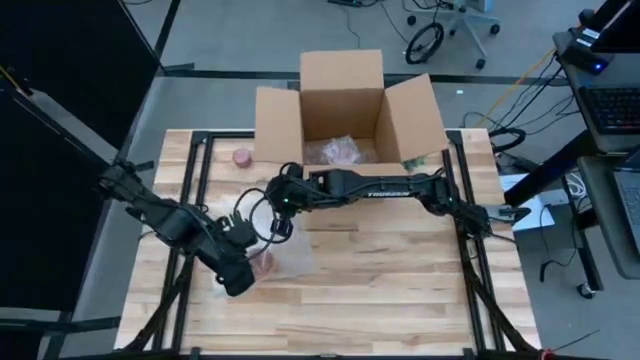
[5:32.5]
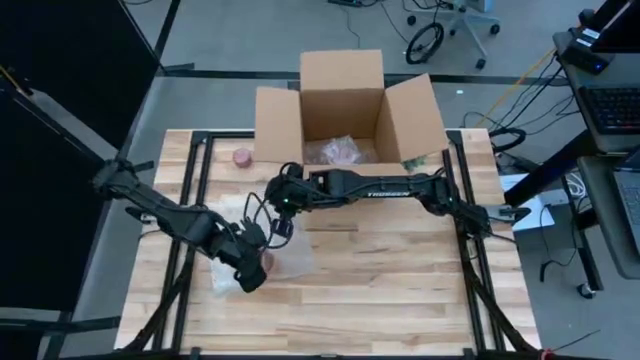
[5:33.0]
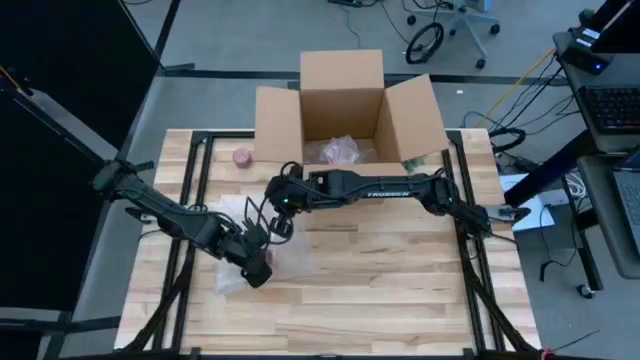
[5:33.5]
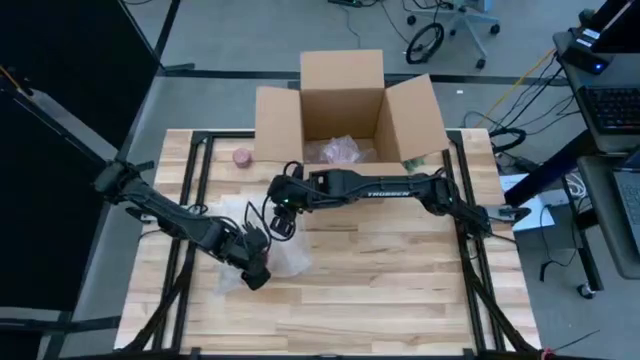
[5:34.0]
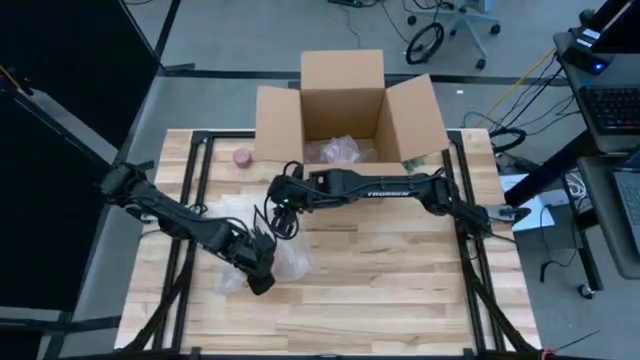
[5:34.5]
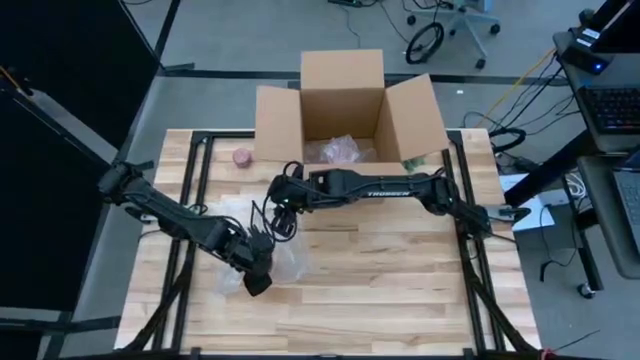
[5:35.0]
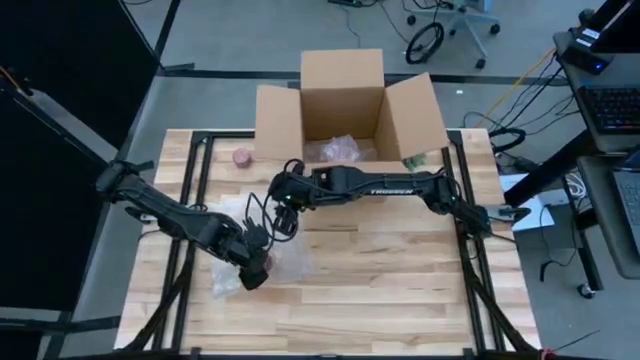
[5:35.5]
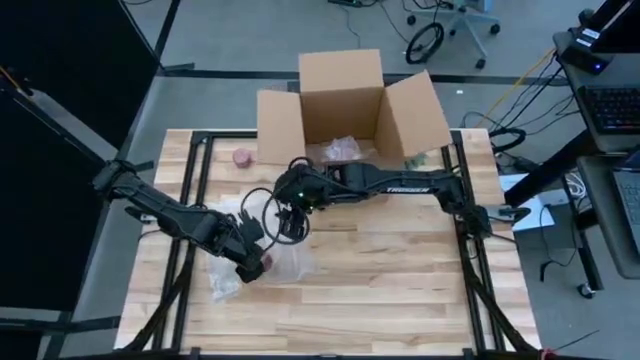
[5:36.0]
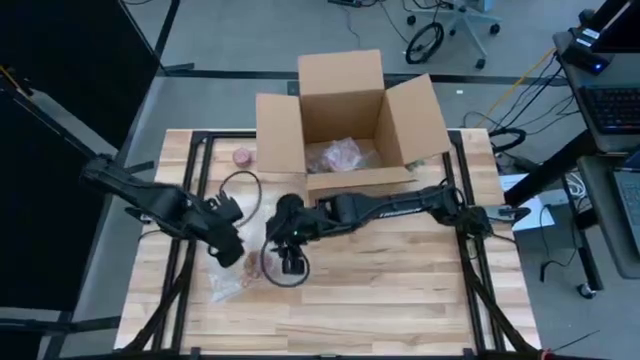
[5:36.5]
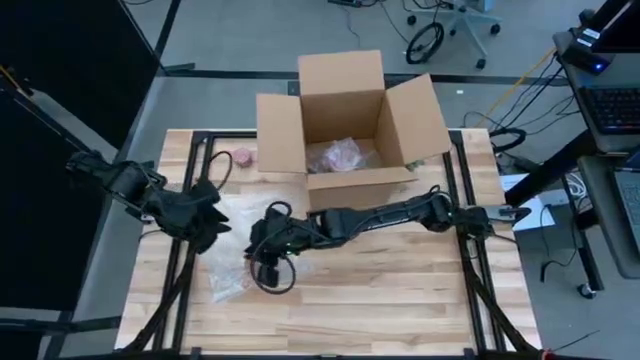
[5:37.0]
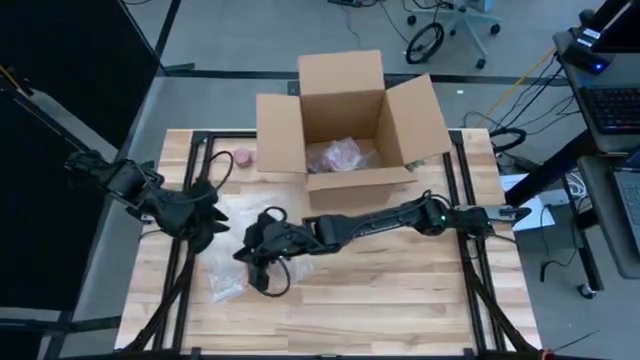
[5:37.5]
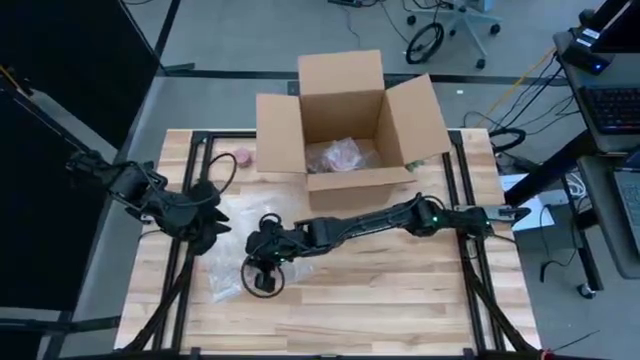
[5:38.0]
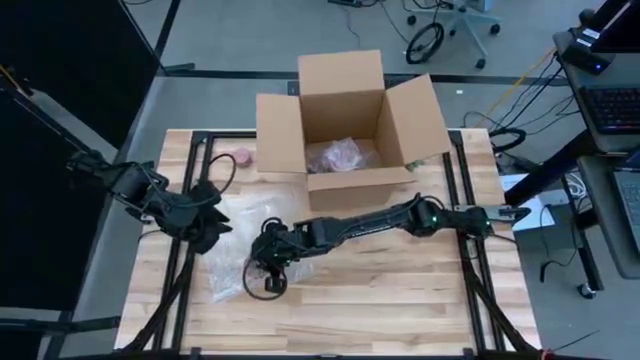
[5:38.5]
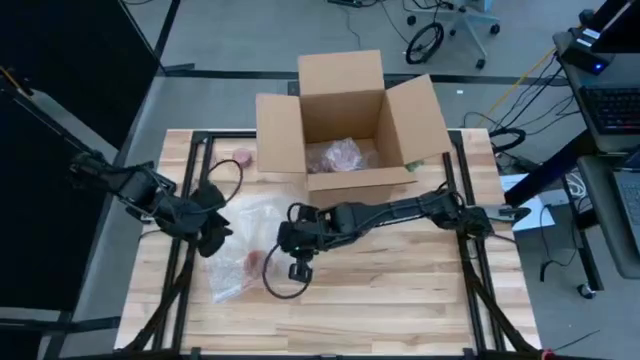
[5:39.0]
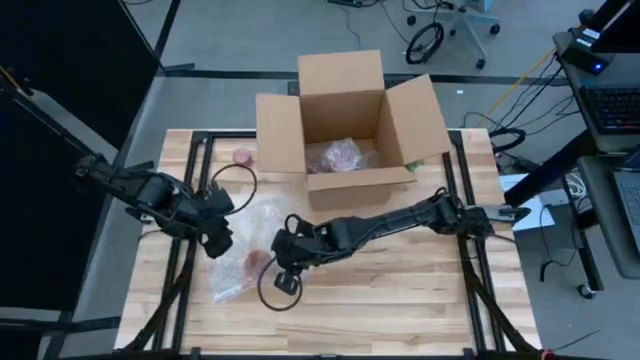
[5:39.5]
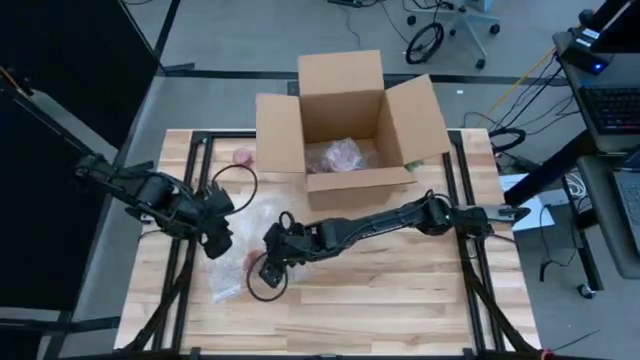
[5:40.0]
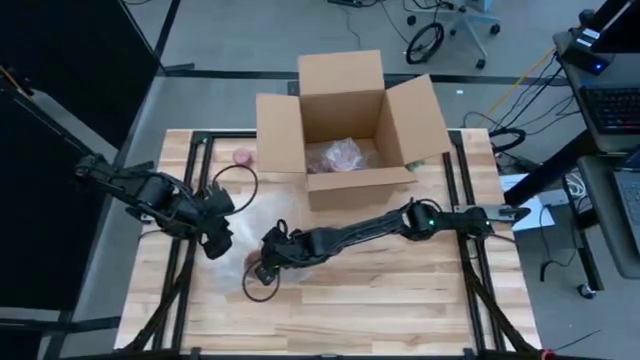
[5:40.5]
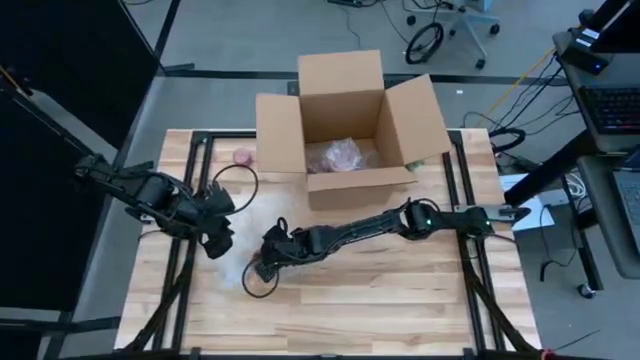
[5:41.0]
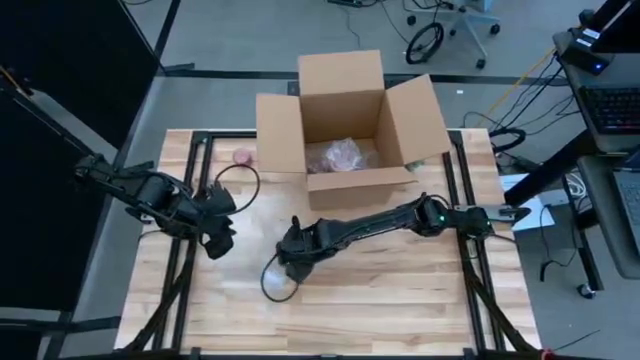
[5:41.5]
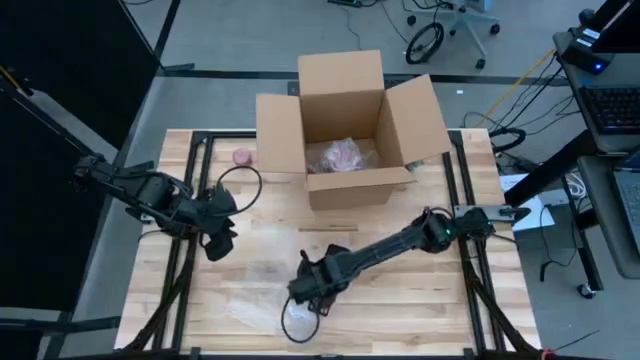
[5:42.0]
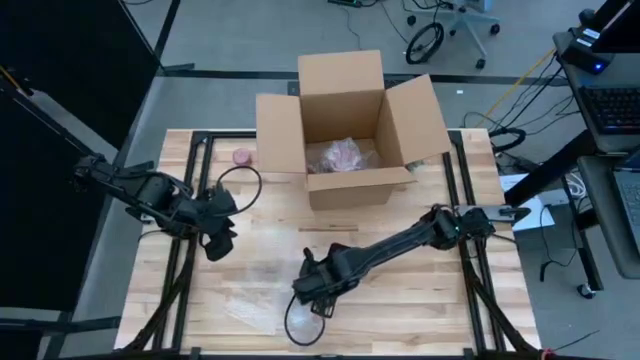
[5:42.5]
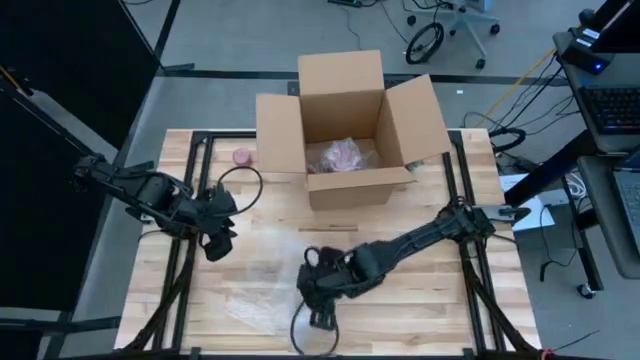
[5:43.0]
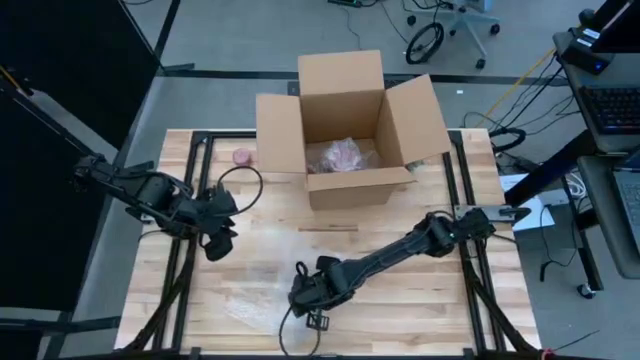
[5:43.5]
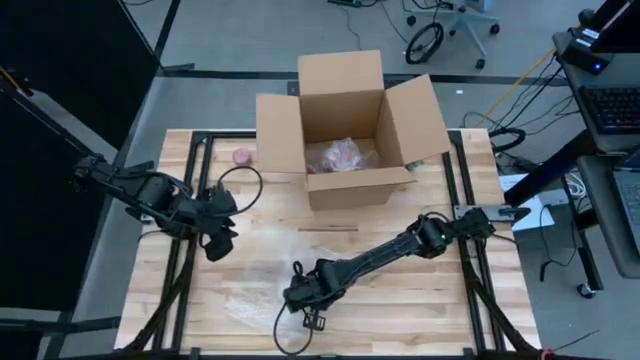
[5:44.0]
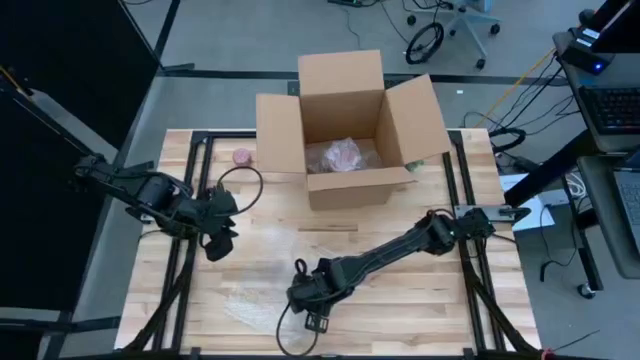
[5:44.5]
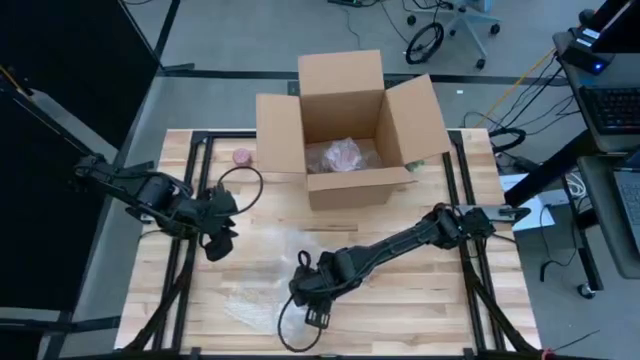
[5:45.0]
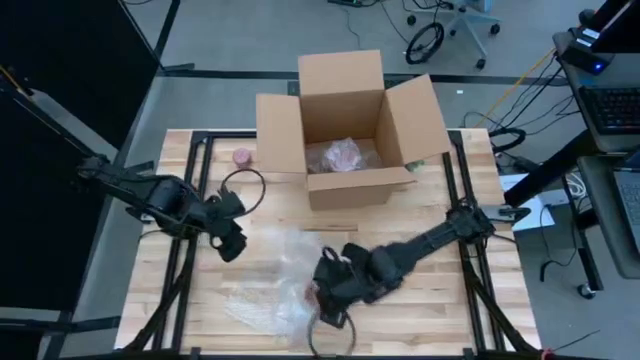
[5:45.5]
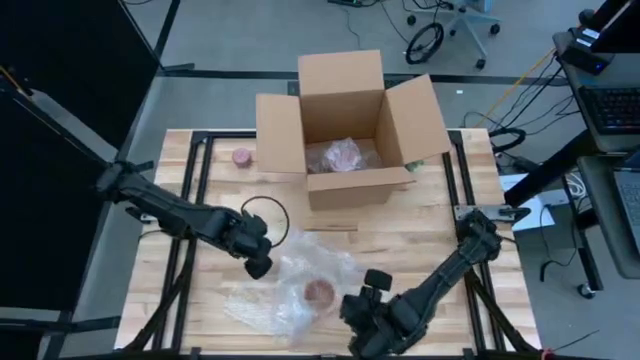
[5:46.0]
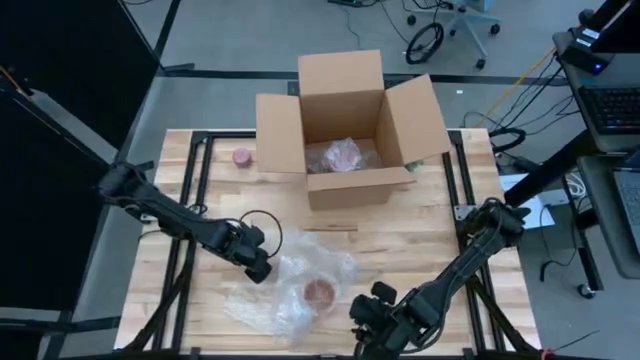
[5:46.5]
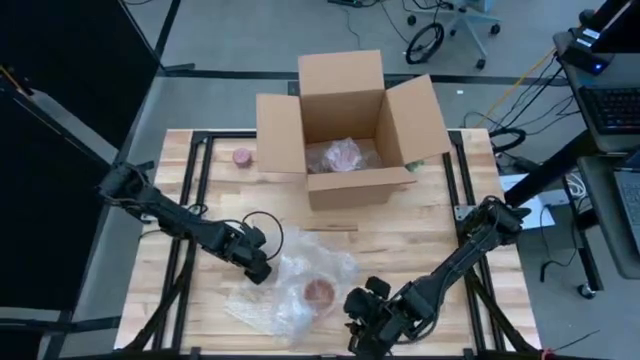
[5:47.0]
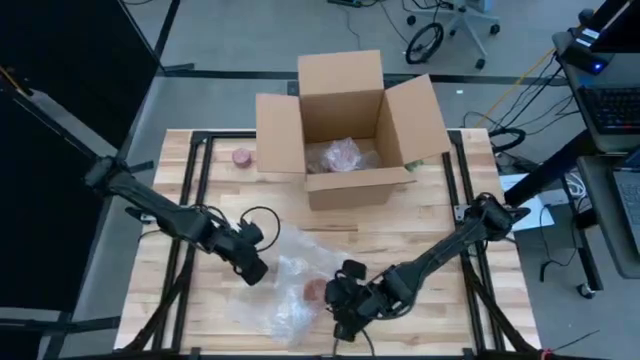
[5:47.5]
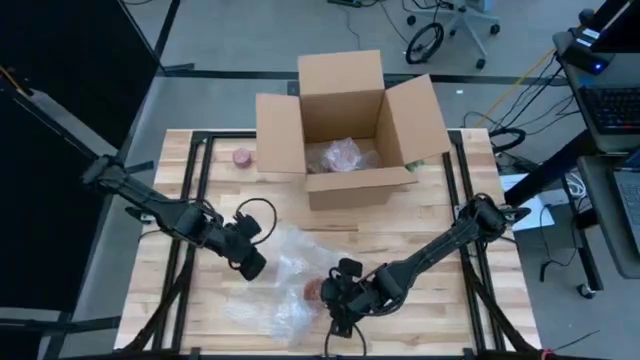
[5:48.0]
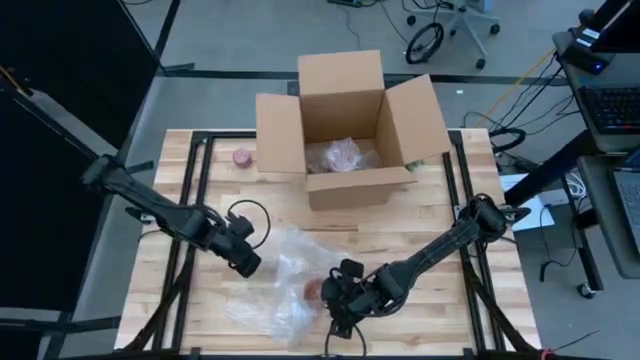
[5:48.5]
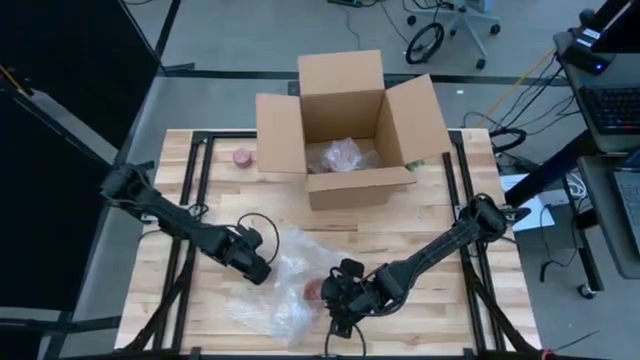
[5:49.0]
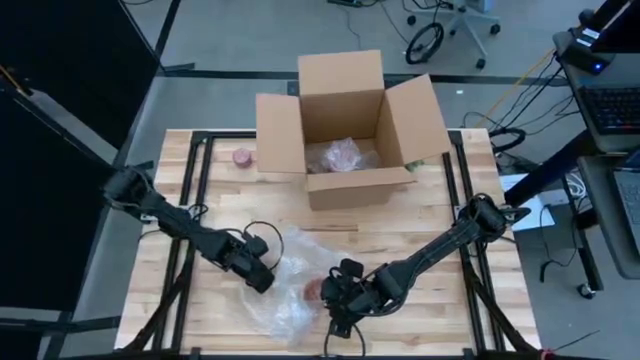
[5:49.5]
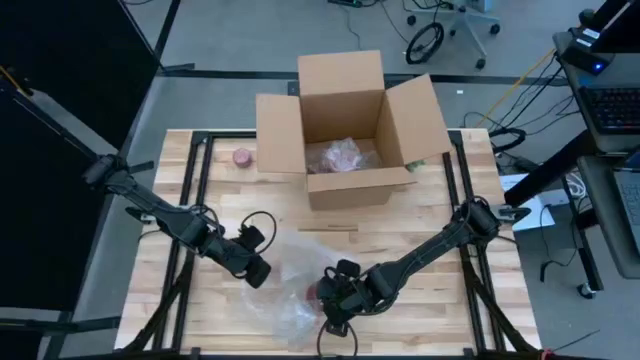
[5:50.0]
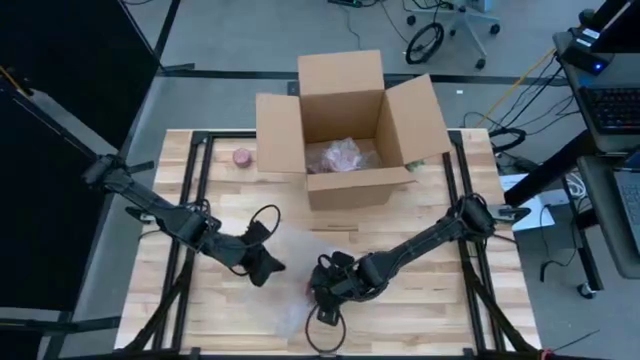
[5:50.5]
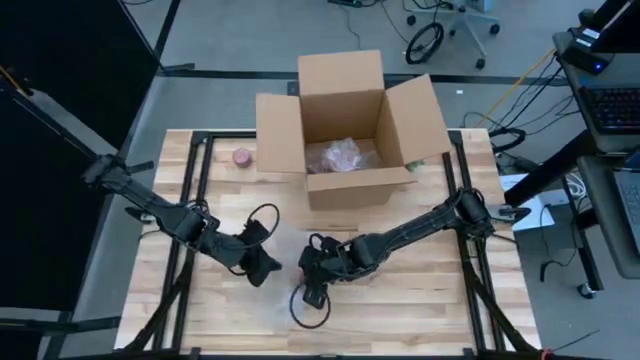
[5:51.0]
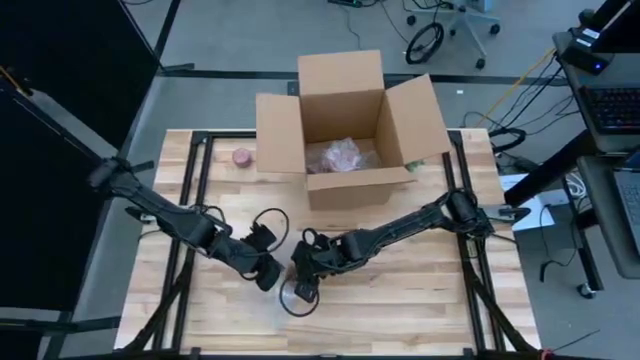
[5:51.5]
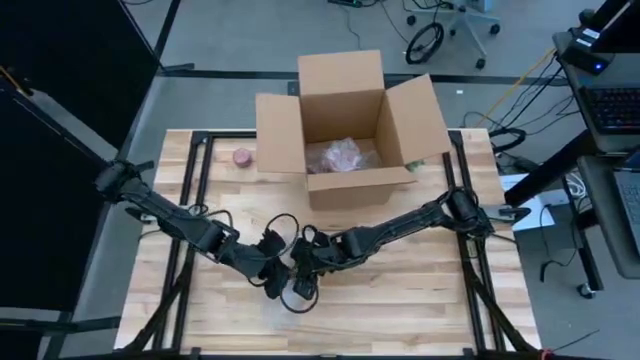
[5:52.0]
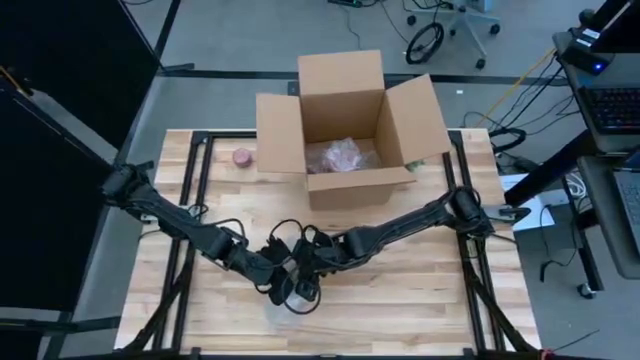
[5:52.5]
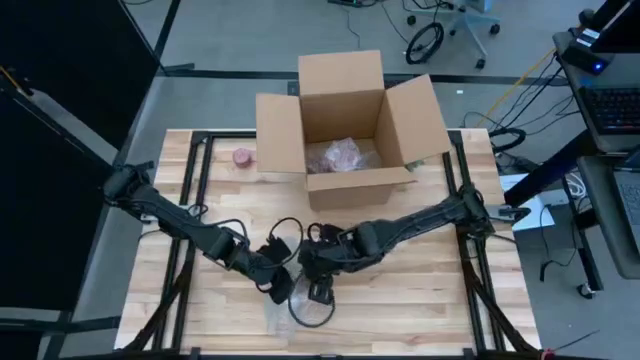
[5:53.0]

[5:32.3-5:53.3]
Task: wrap mug
Wrap the orange cup with the bubble wrap
